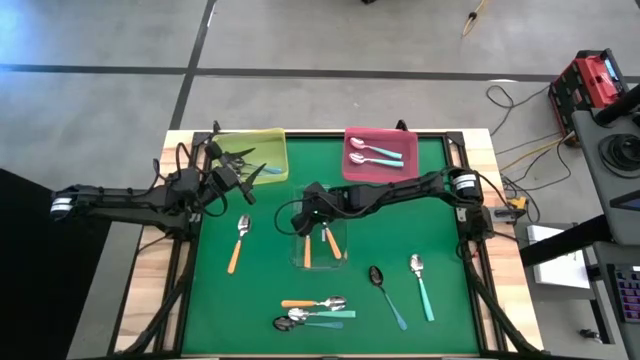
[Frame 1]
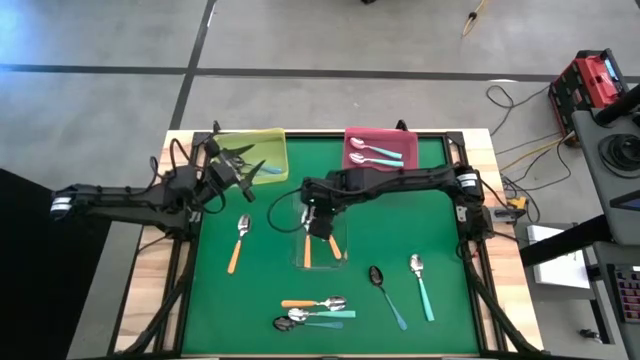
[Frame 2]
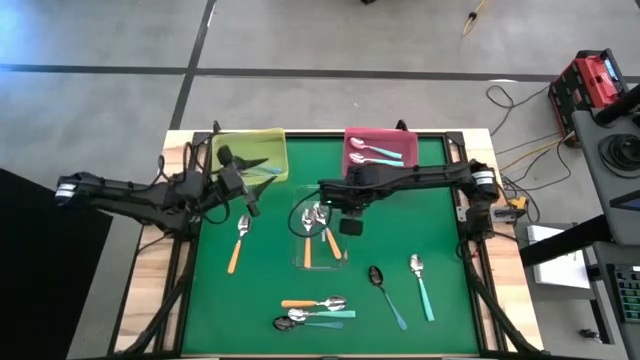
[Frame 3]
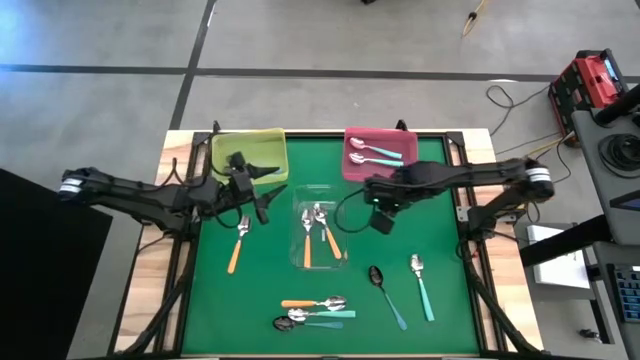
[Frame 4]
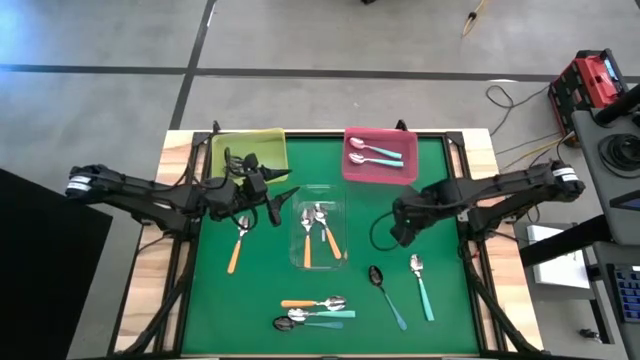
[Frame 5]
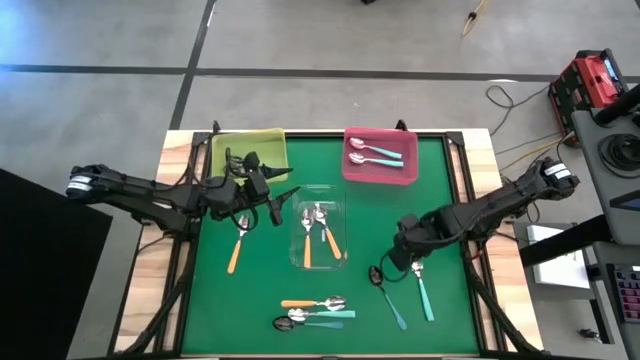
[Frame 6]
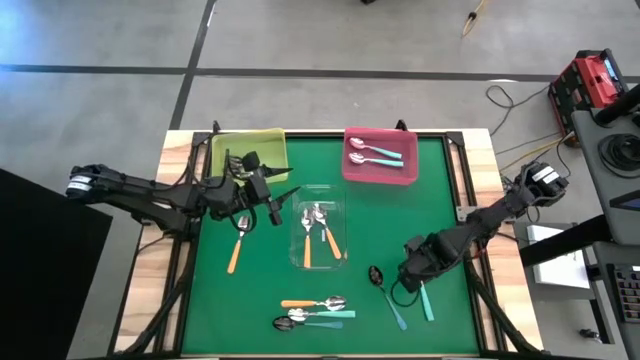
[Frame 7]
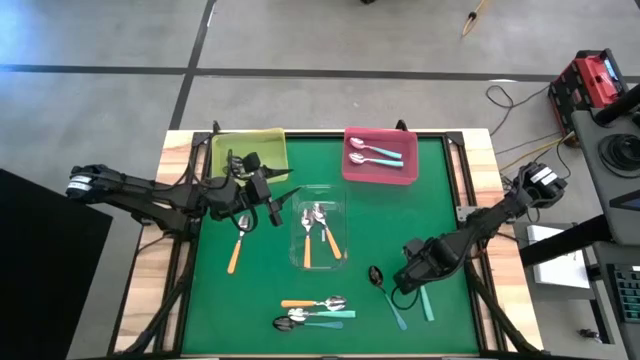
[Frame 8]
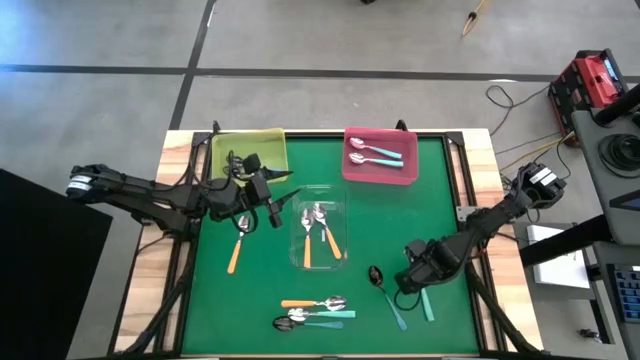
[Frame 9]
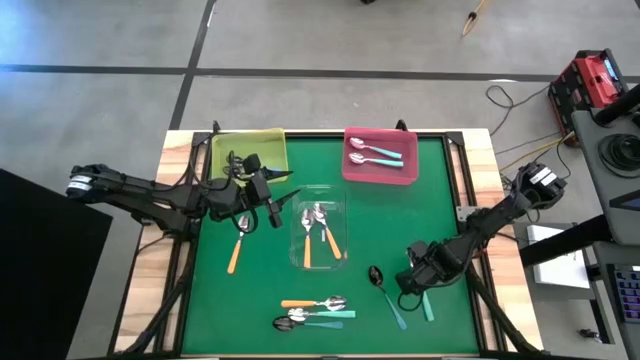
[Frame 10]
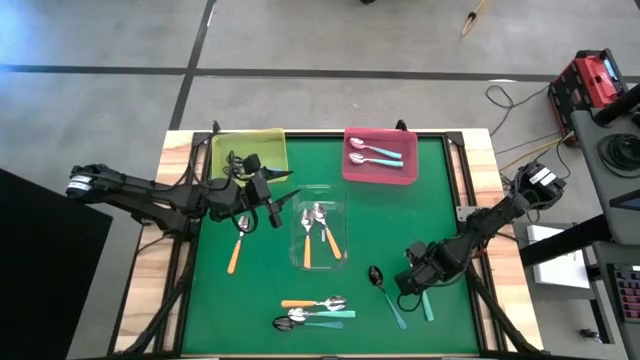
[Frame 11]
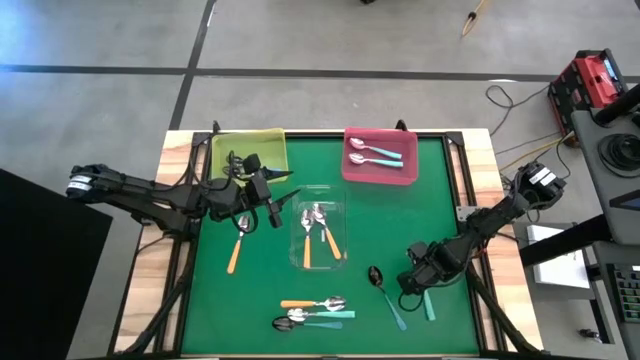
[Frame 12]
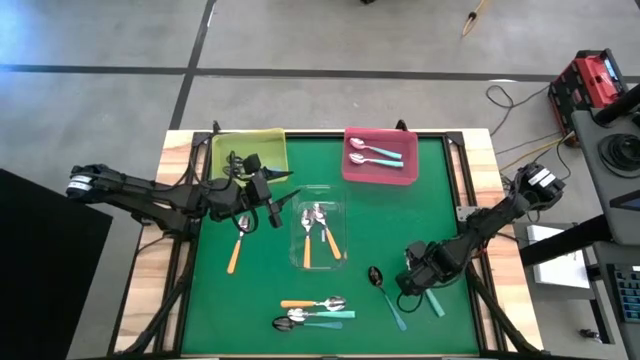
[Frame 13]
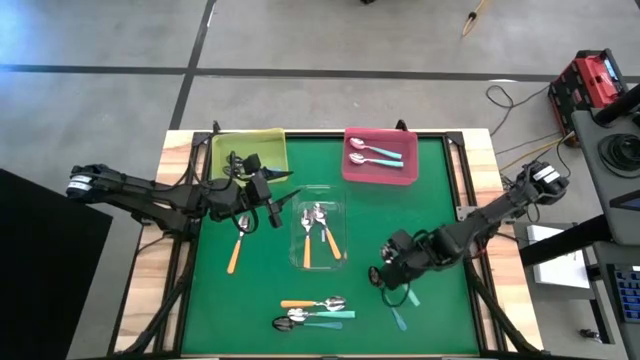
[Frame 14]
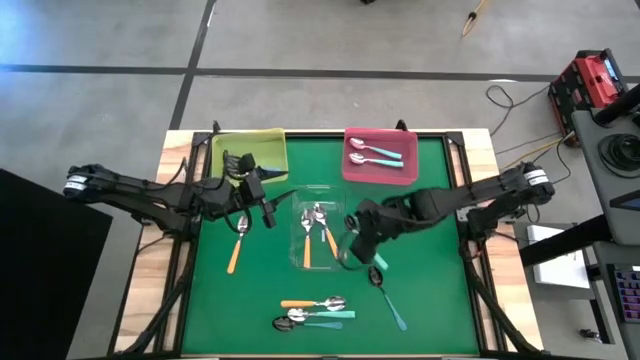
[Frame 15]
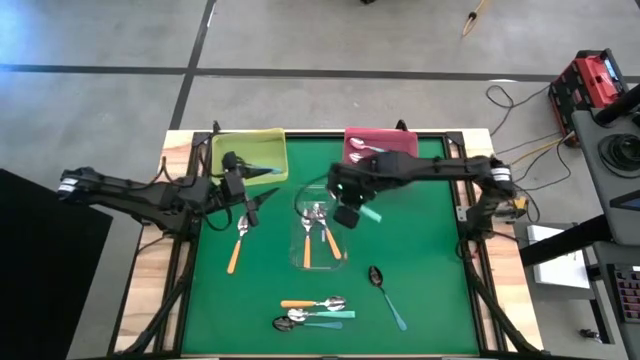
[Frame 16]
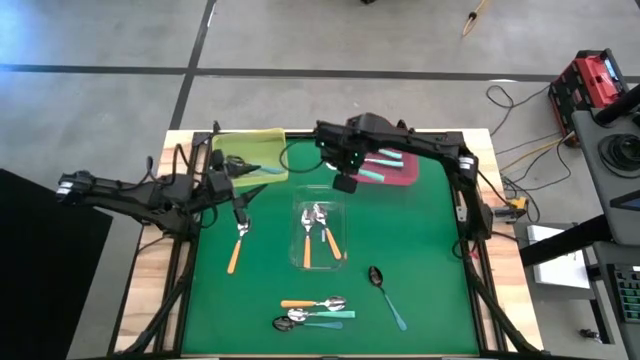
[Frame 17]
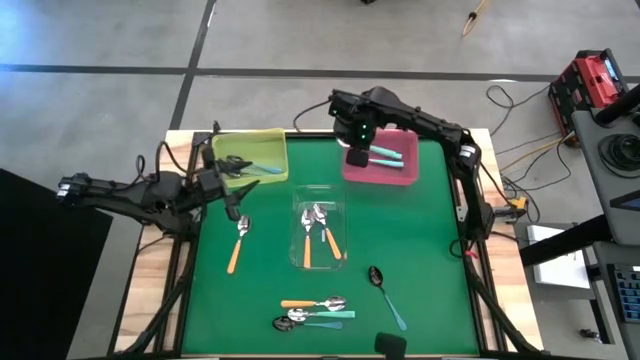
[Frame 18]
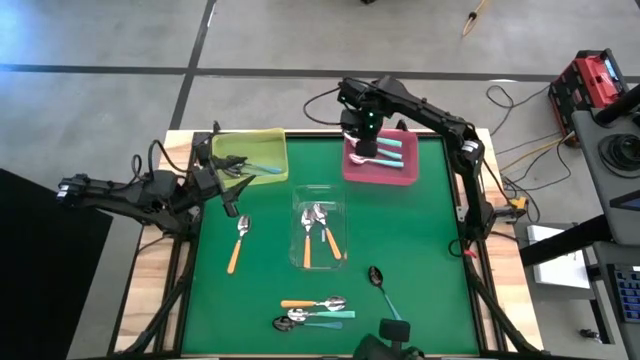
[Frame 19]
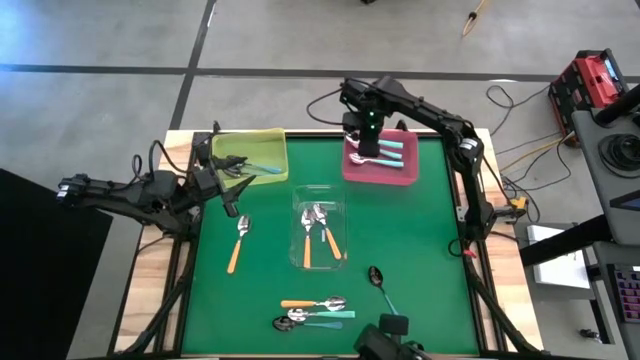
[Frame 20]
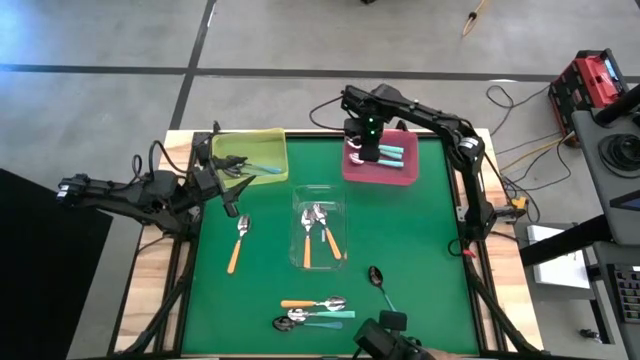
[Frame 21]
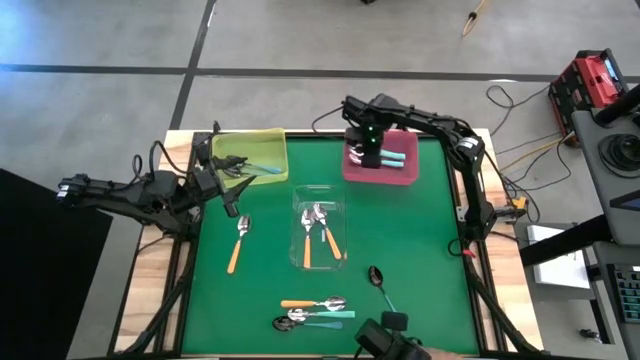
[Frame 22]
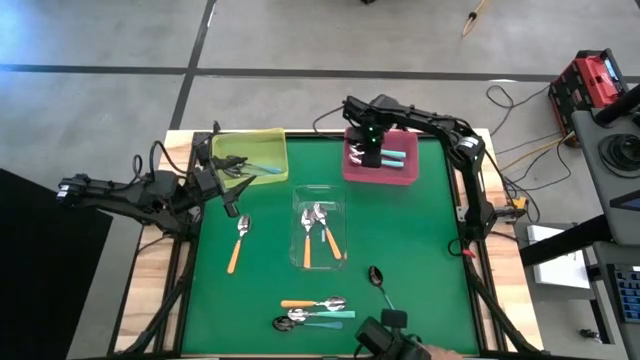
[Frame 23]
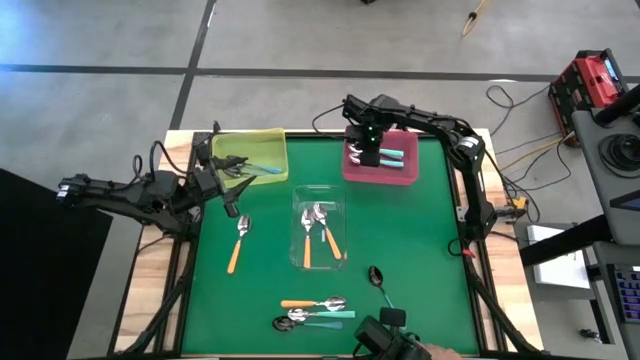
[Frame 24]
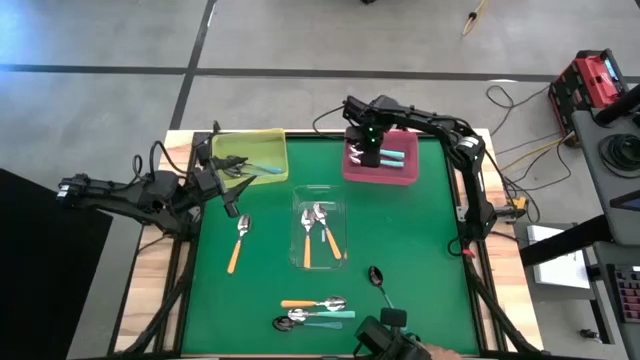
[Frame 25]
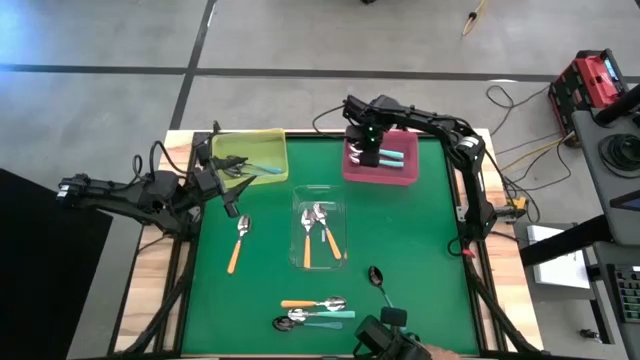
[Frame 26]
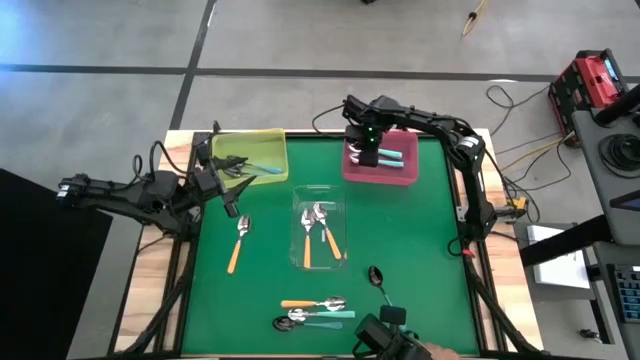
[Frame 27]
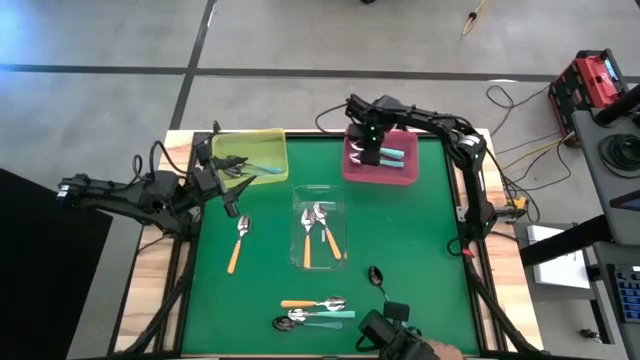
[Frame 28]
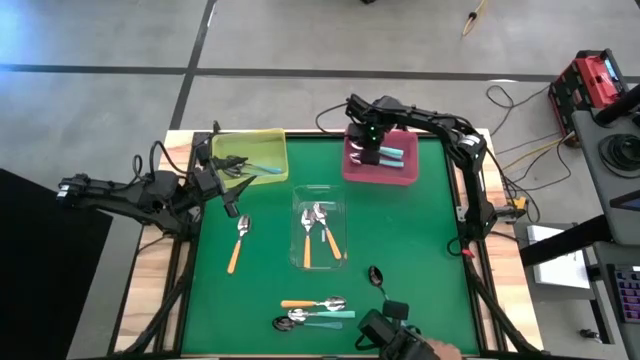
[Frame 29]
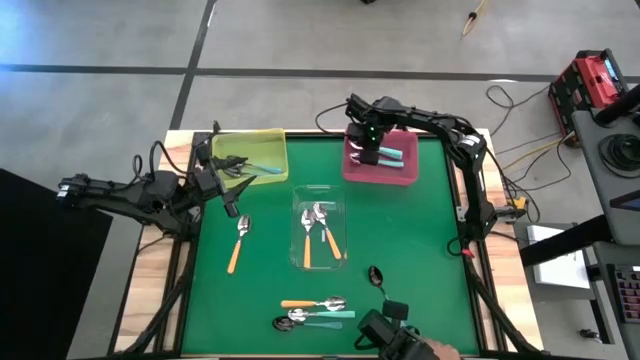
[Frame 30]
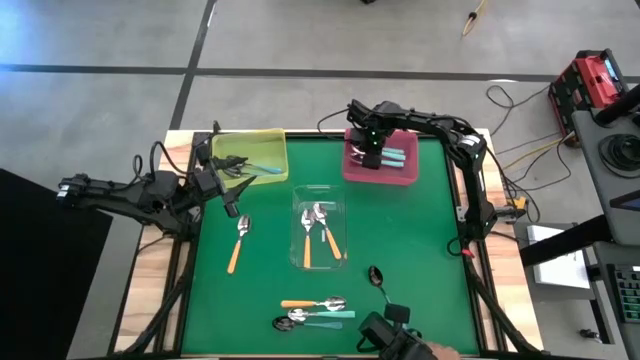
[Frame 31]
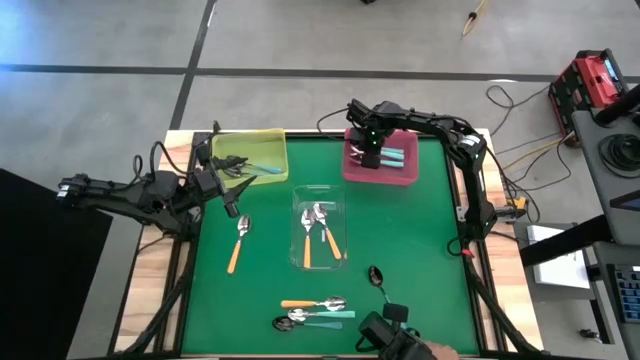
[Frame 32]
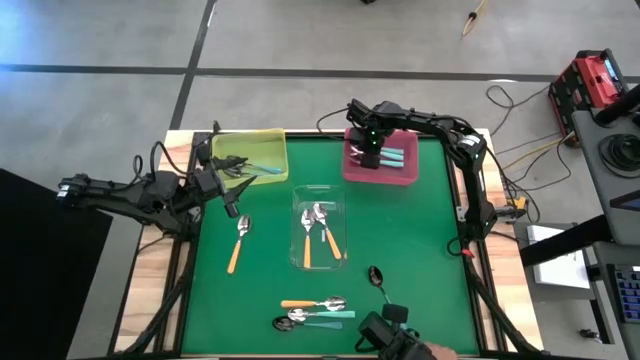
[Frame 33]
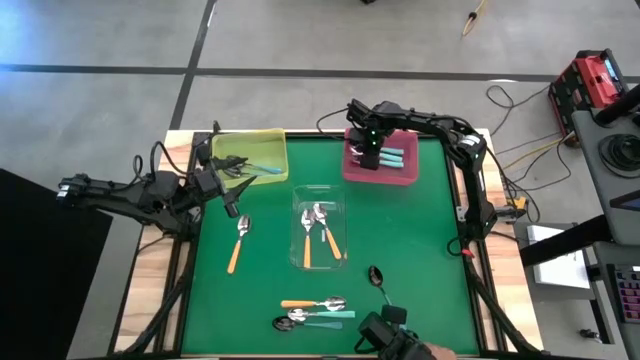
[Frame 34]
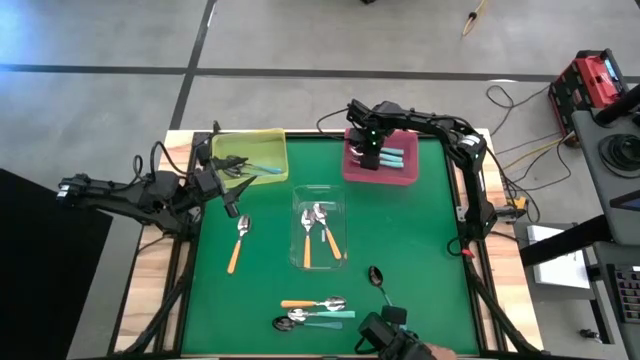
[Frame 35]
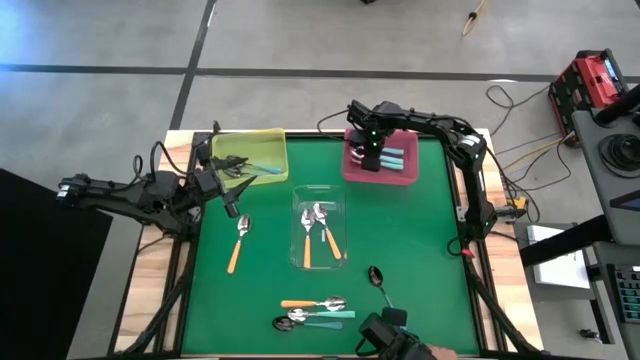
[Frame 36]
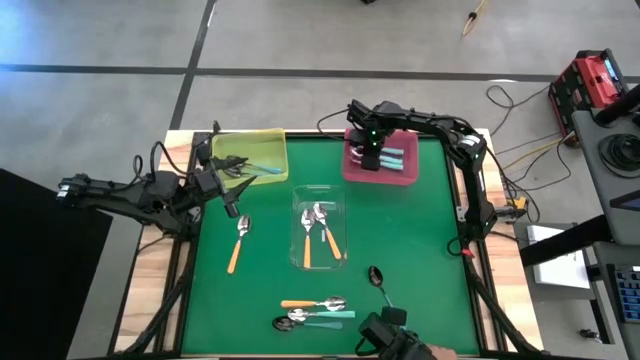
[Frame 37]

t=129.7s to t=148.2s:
Task: Sort silverware by color (type)
Put the right light blue spoon into the pink bin

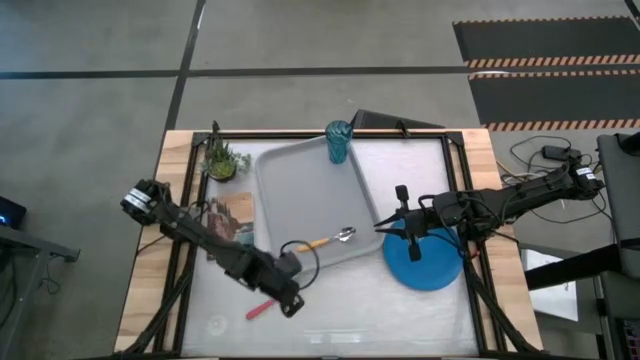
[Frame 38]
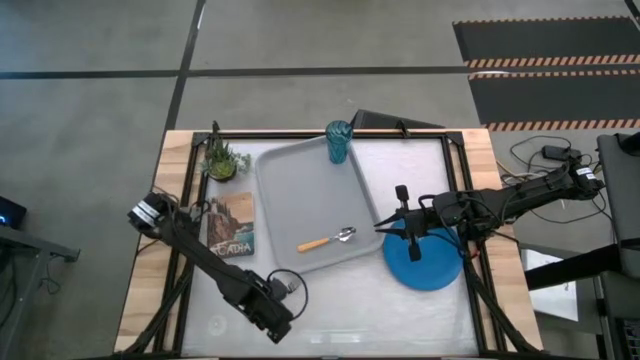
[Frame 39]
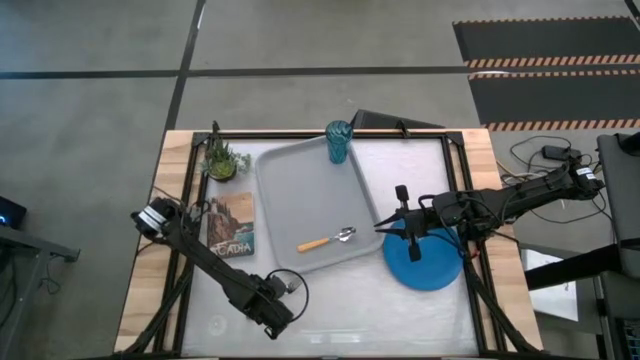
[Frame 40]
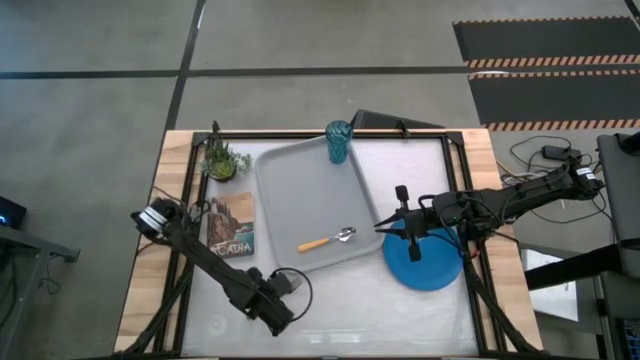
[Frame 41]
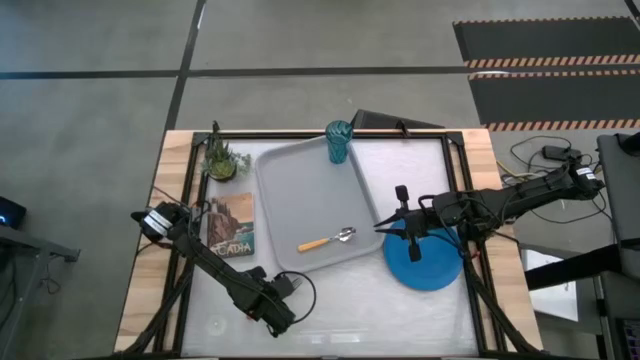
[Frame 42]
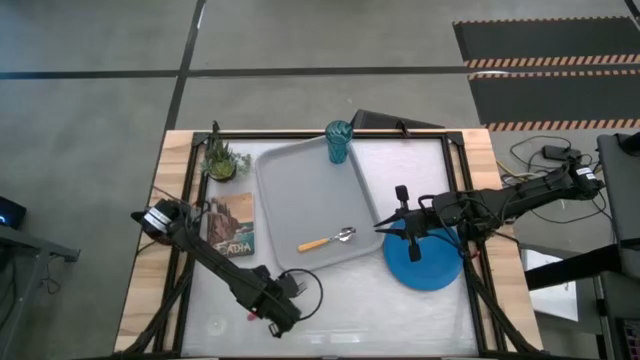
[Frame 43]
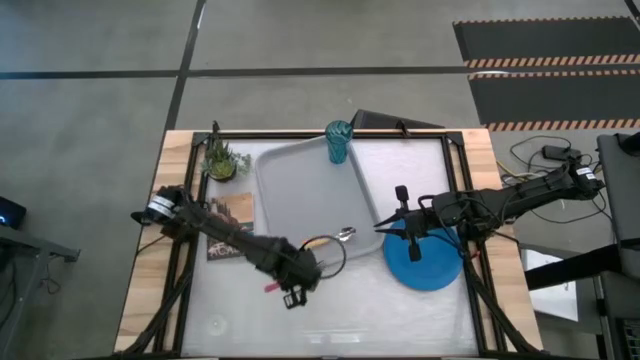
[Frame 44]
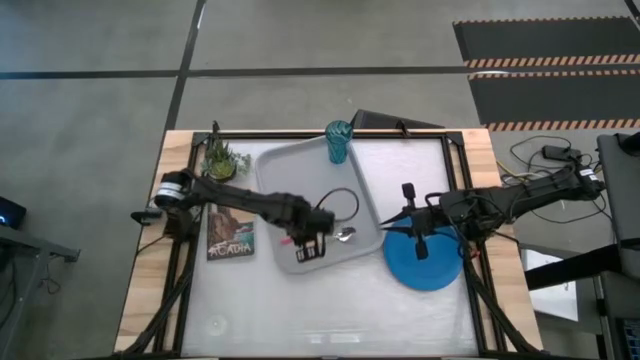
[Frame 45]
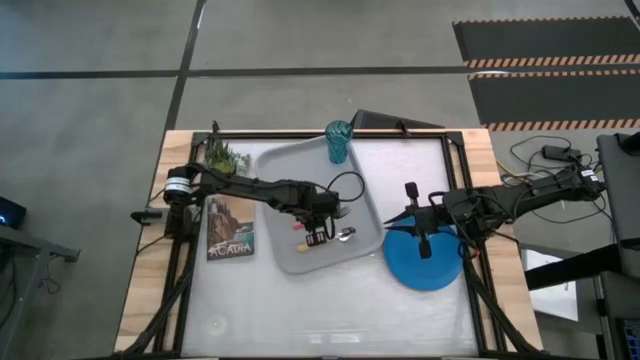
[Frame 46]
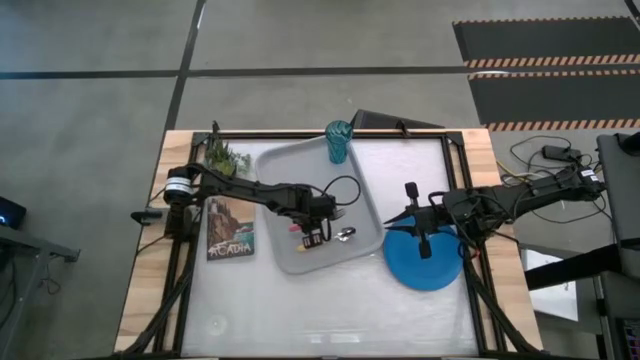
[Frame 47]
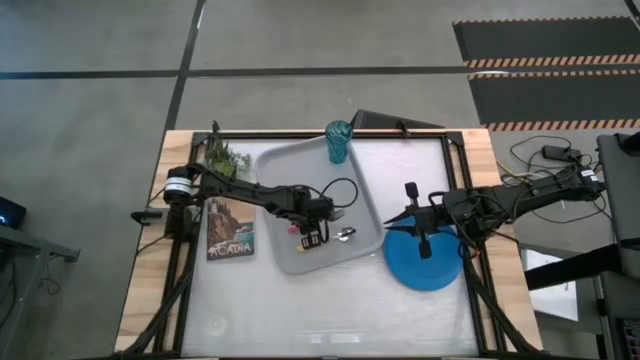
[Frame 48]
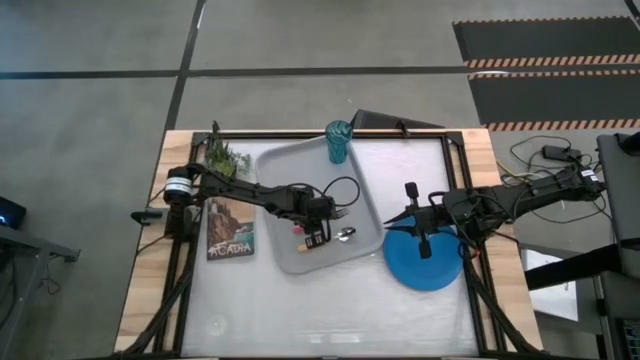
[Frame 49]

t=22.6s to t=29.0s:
Task: Pick and place plate/cup/fork/spoon on tray
Put the red fork on the left of the yellow spoon on the gray serving tray
